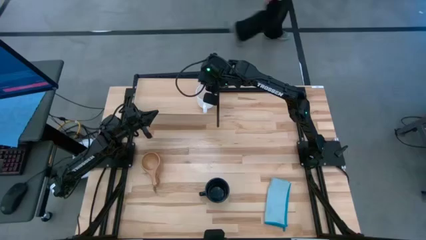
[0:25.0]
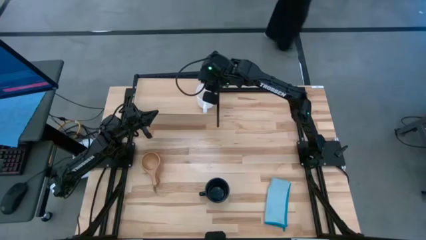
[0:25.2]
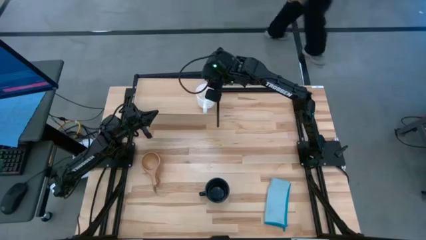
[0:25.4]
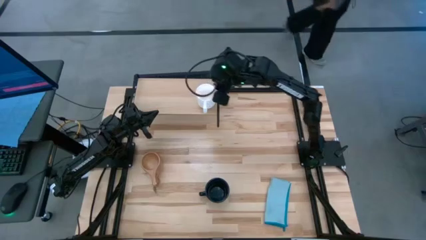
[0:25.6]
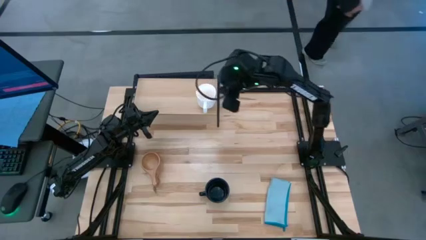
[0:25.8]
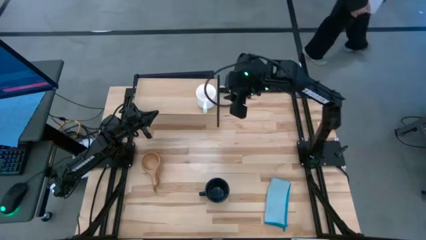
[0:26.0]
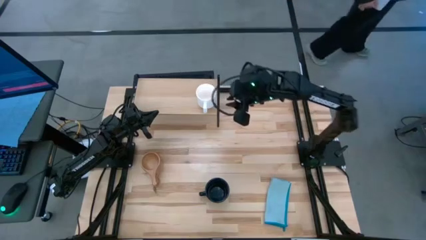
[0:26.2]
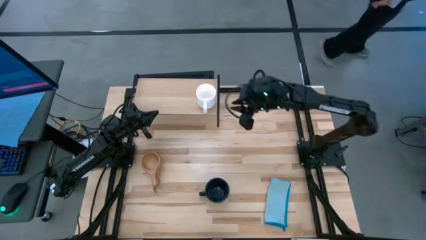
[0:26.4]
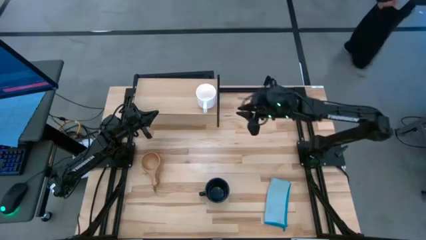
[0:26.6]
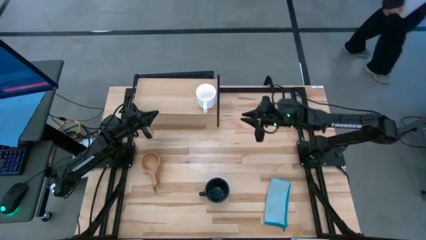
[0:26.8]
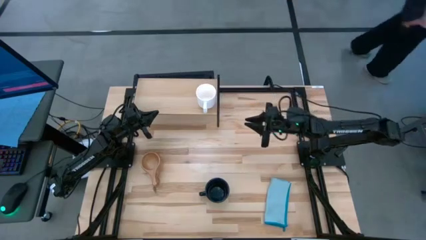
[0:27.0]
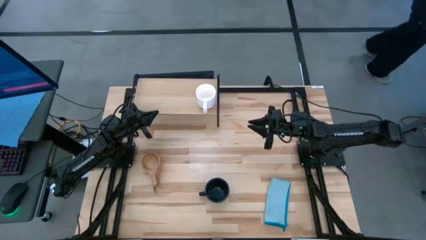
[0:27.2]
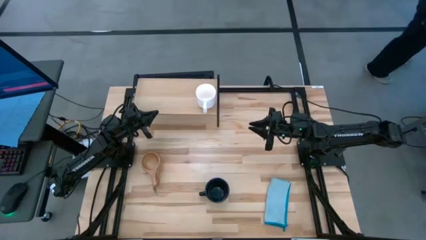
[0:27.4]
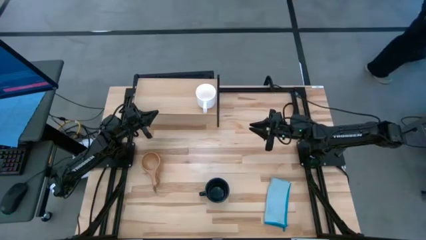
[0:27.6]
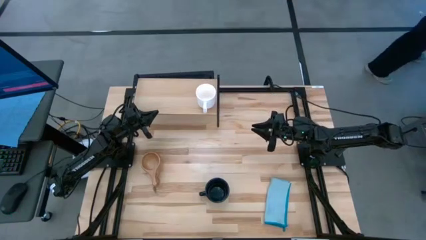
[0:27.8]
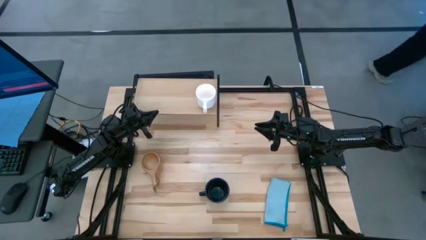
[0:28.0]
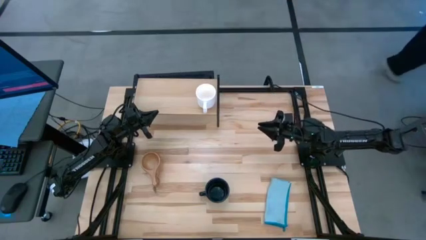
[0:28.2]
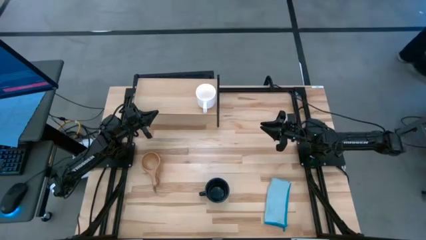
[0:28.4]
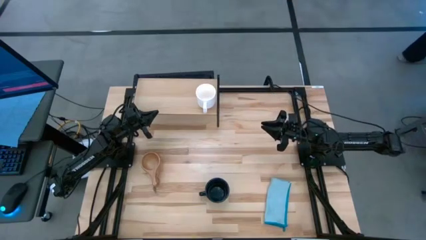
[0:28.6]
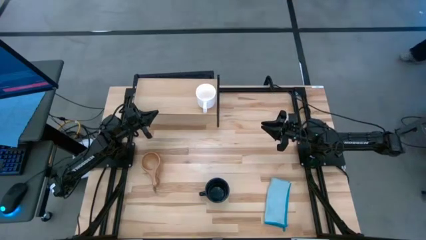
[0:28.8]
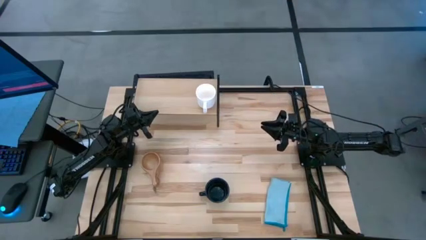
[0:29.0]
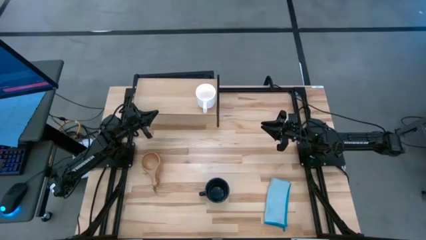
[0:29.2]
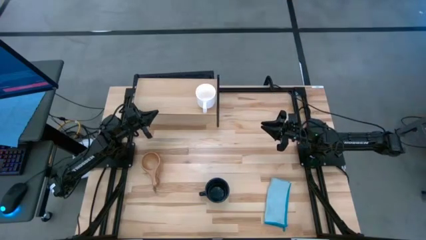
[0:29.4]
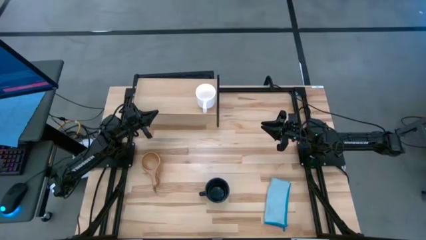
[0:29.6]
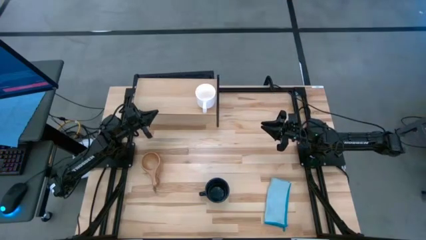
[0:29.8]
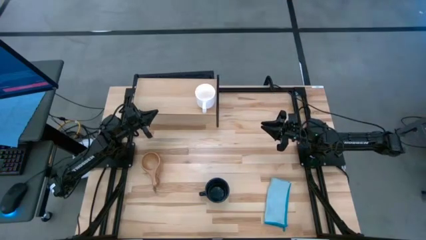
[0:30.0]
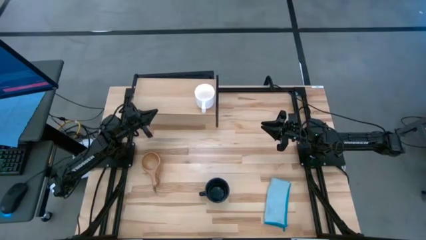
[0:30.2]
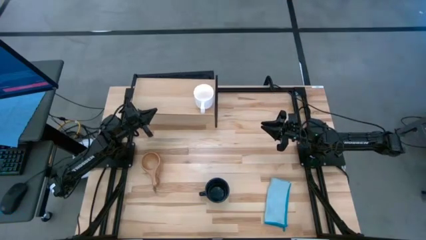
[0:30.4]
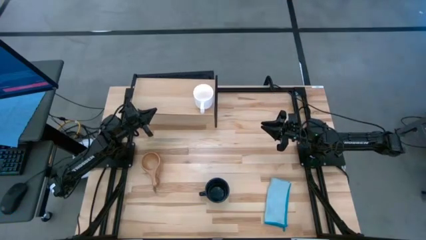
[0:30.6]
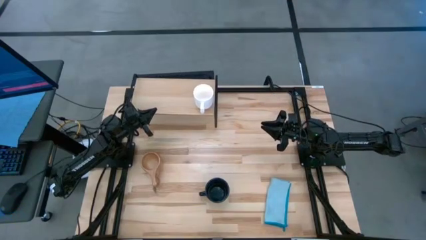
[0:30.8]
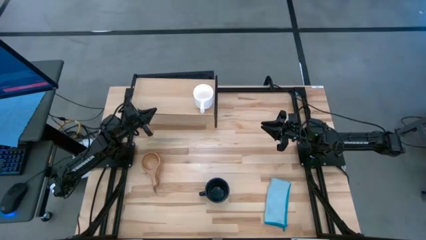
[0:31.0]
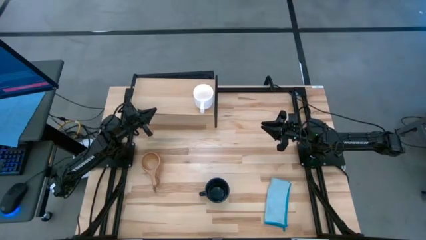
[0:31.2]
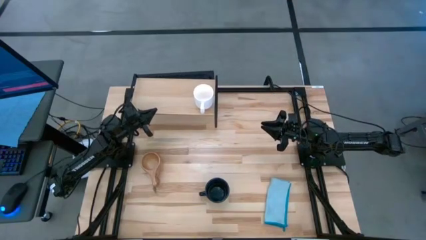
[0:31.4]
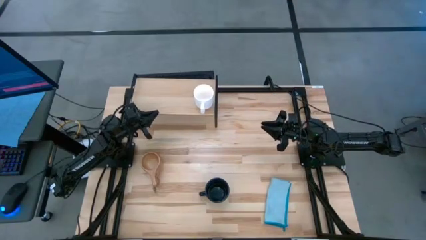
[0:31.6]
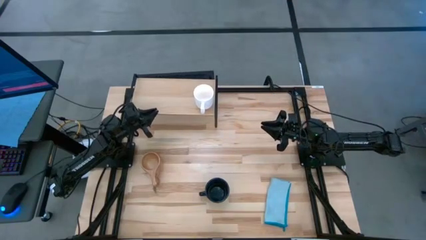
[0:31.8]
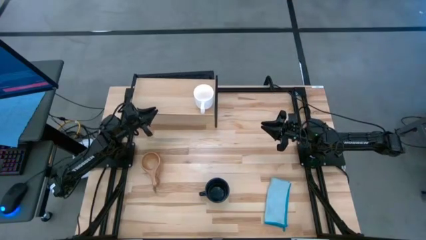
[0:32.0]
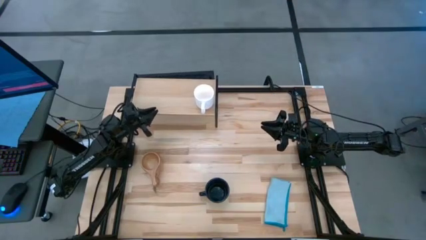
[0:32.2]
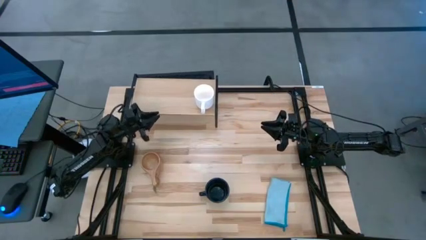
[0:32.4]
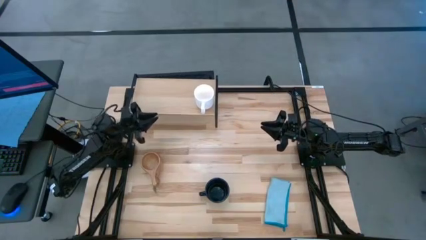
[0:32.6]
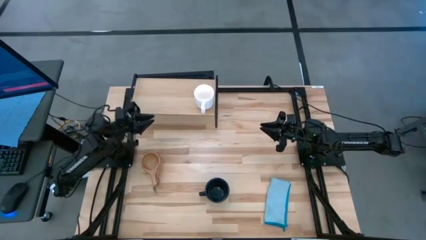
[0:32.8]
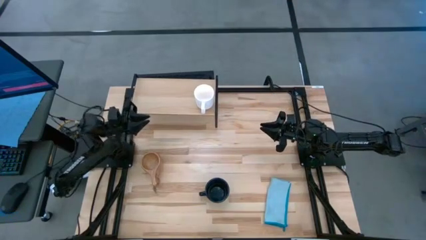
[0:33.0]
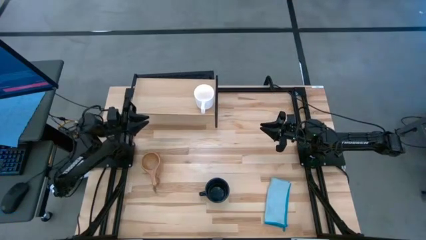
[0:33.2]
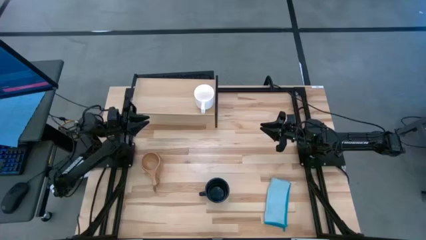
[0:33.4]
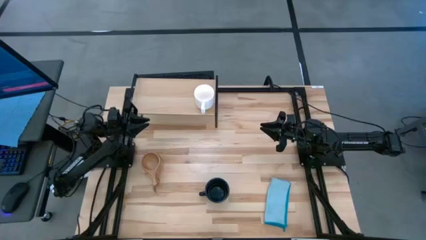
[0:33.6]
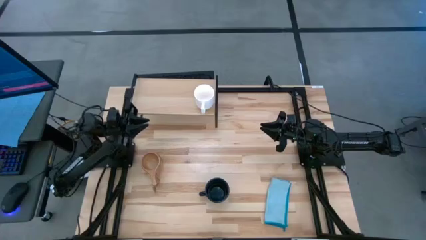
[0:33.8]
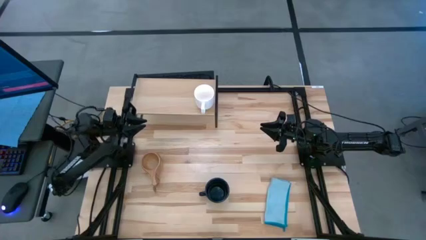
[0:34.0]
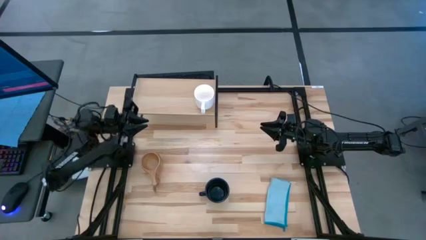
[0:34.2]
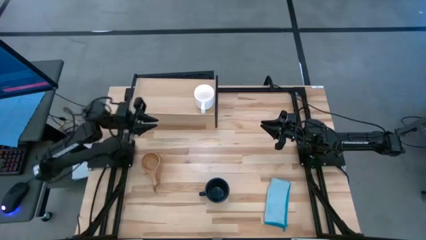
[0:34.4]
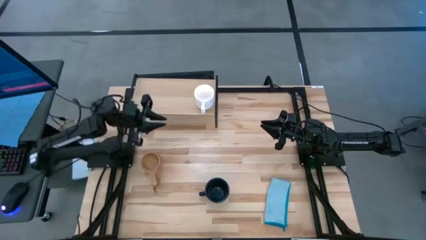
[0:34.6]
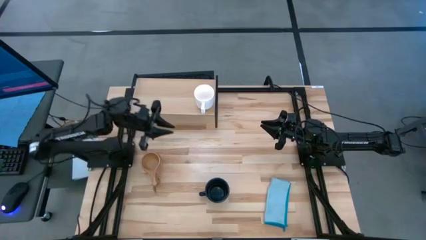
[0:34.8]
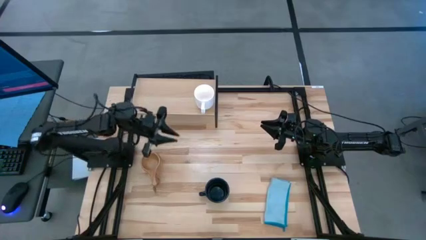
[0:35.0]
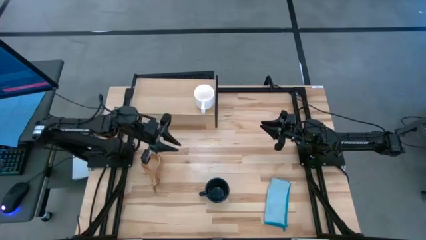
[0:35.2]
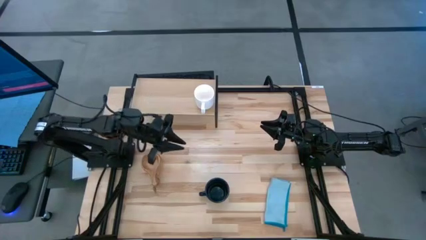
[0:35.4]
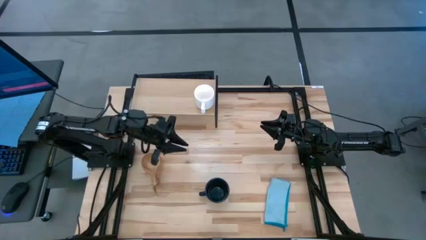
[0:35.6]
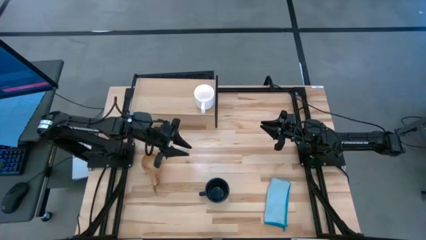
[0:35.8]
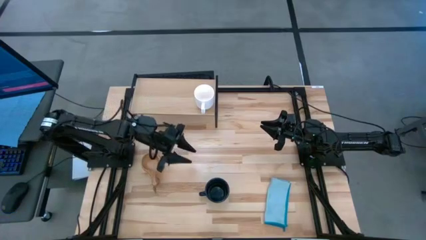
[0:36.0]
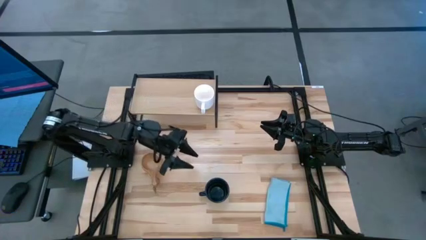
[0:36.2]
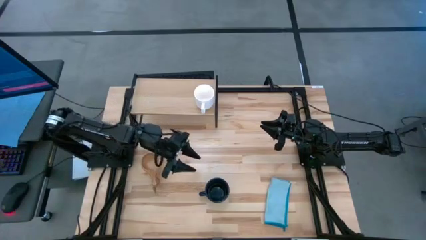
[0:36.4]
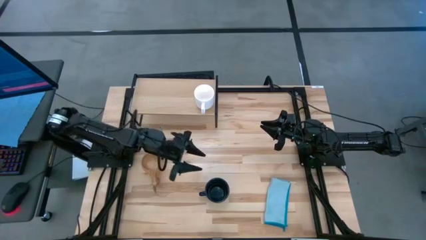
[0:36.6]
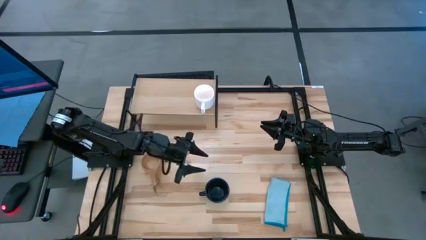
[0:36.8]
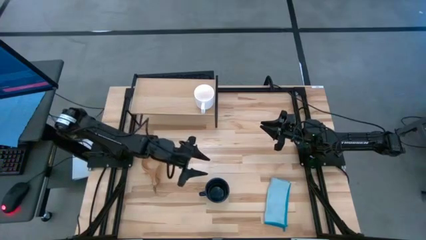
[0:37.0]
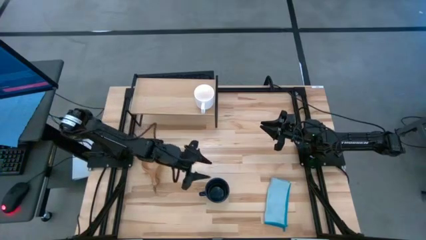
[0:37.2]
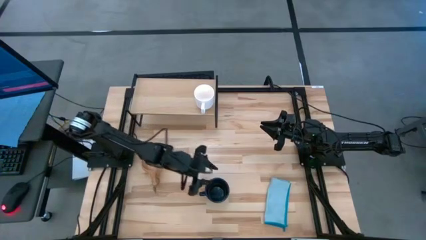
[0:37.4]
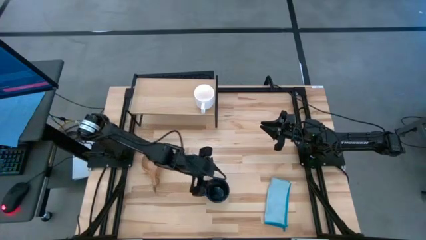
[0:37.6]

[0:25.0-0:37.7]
Task: Stack small to large cups/mugs on shelf
Put the dark blue mug on the shelf

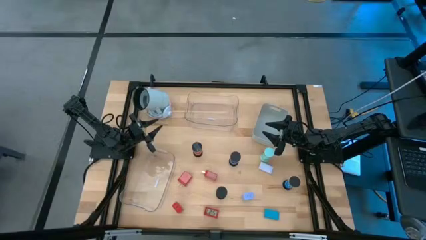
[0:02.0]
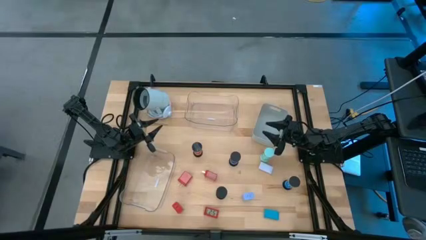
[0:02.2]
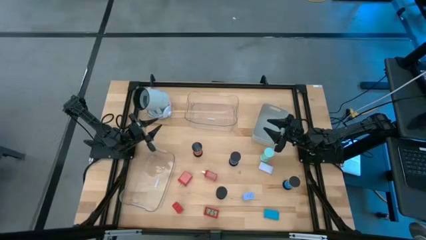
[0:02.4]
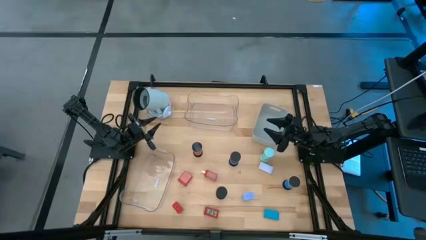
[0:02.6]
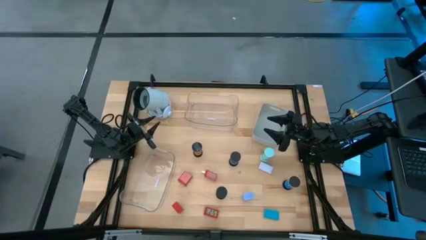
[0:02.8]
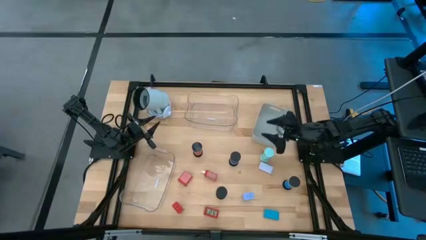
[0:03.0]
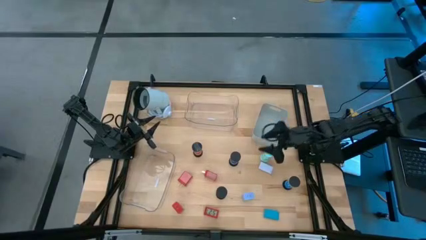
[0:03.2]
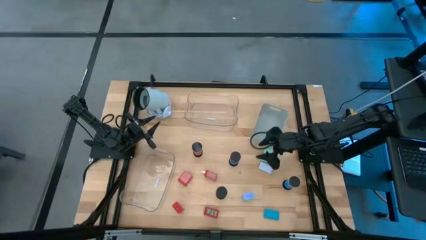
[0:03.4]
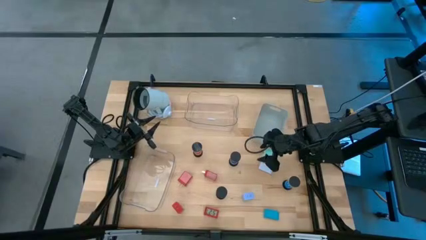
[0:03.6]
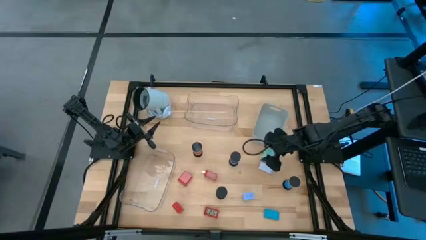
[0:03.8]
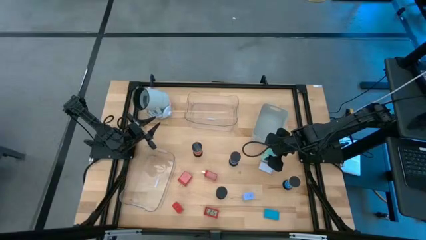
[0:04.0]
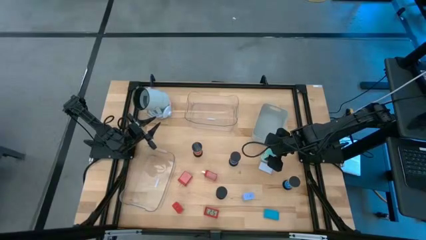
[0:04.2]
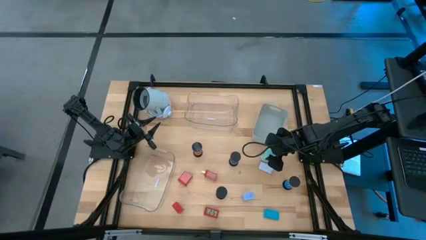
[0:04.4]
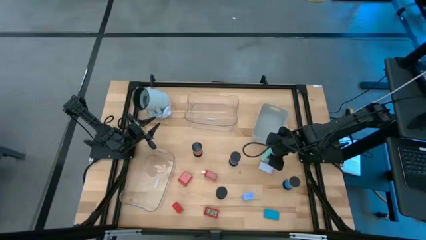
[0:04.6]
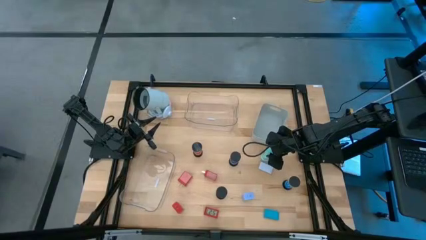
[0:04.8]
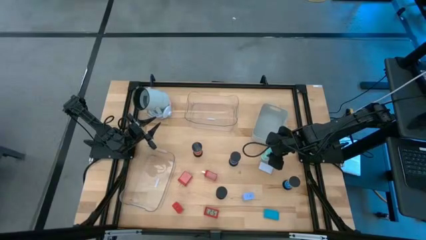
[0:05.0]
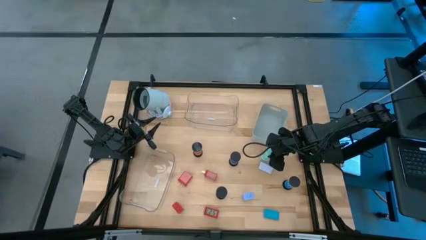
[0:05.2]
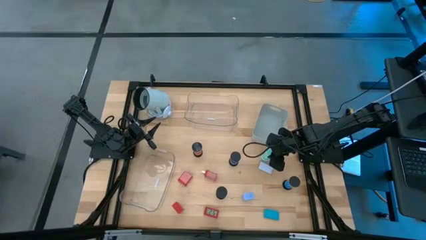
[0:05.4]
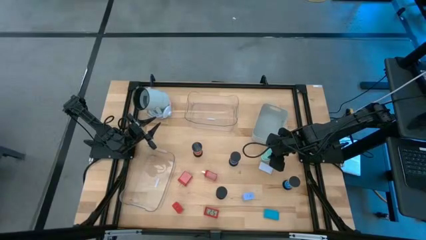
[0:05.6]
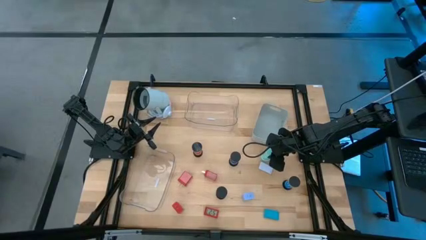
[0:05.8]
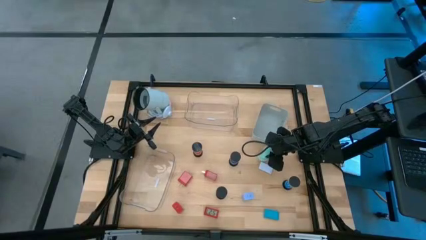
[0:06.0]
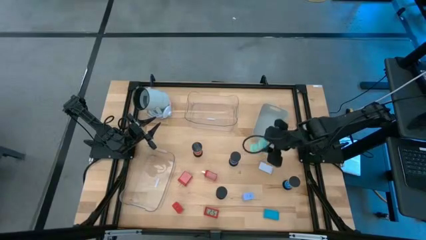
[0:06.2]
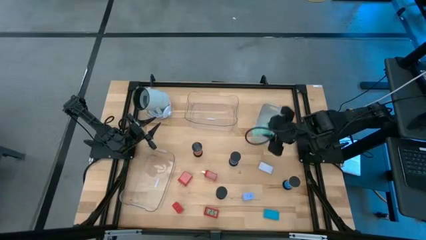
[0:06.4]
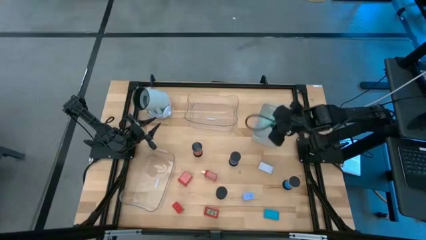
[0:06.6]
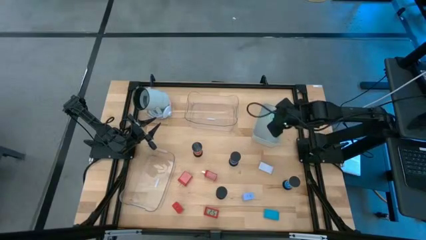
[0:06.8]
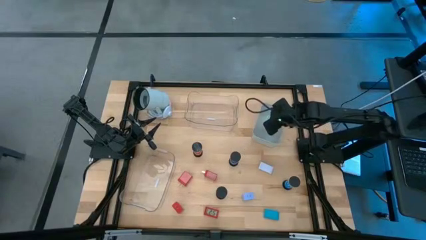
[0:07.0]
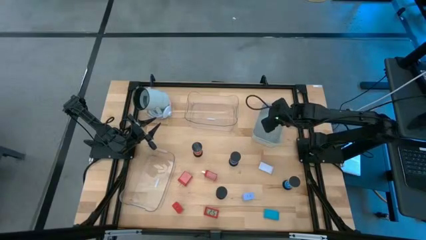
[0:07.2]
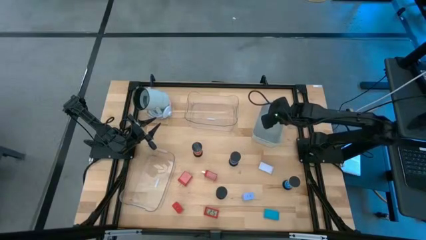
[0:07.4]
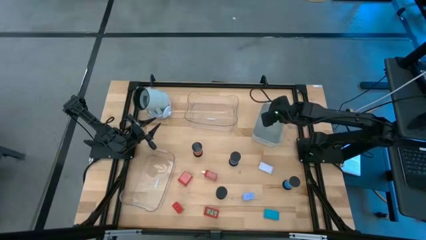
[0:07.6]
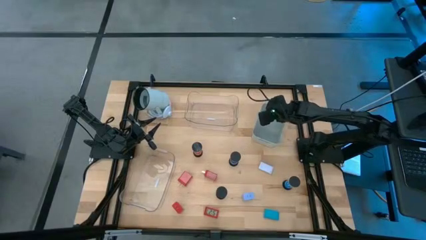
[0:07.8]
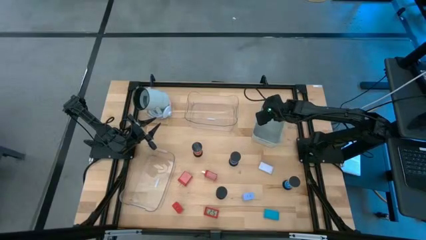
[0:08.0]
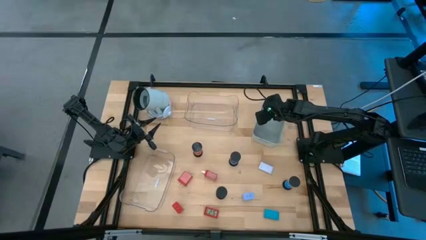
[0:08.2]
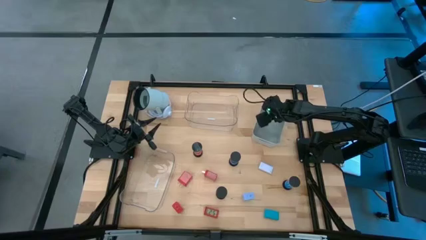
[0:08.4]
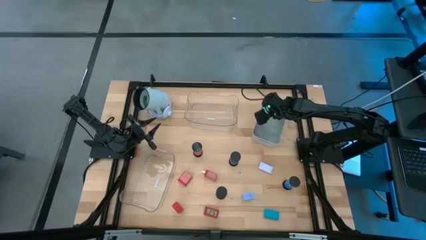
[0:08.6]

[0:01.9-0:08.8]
Task: Pick & Place Office items
Put the light blue hourglass into the grey bin
